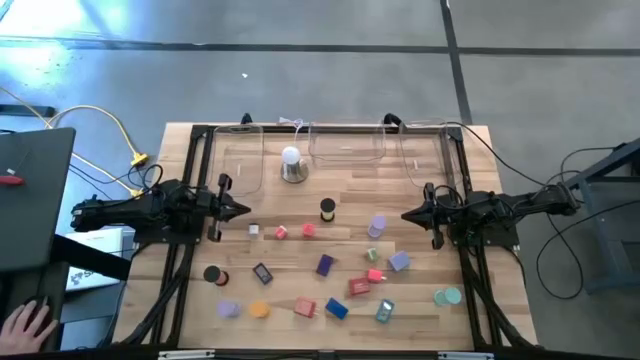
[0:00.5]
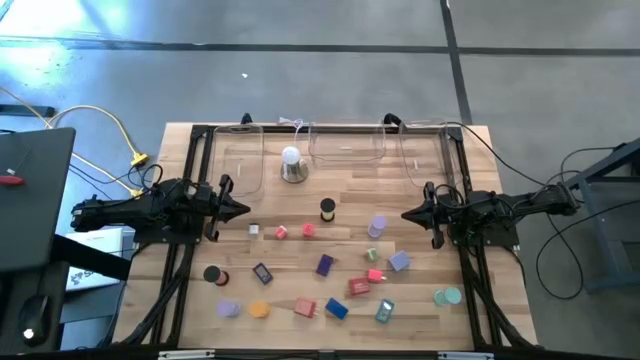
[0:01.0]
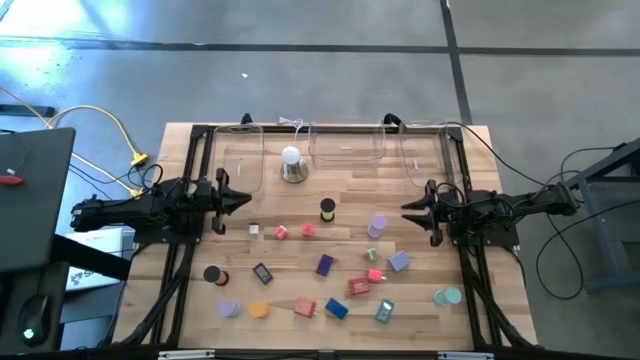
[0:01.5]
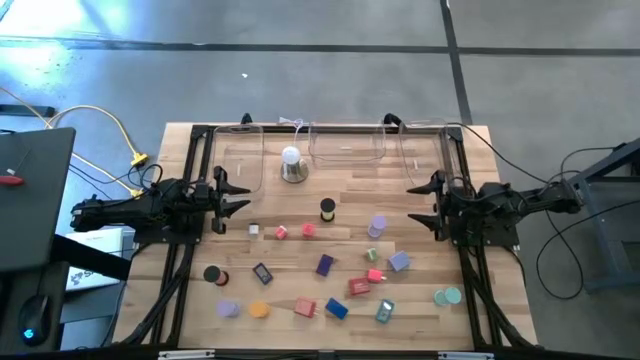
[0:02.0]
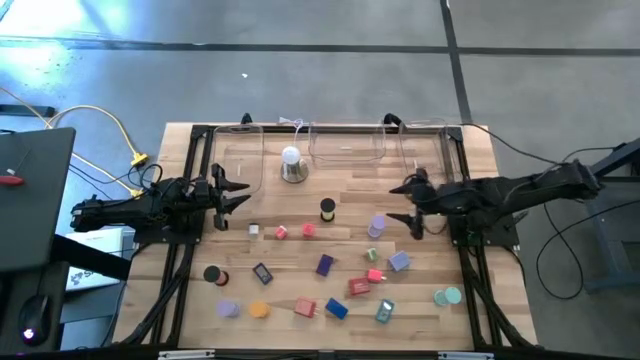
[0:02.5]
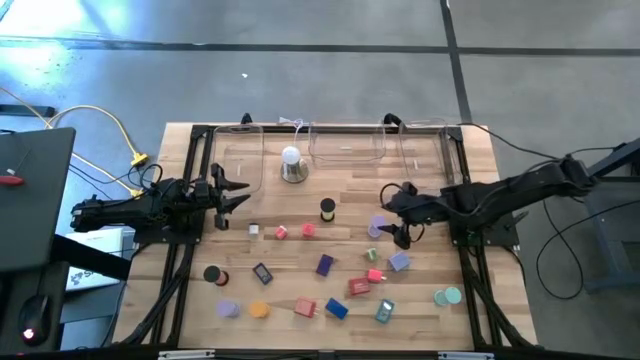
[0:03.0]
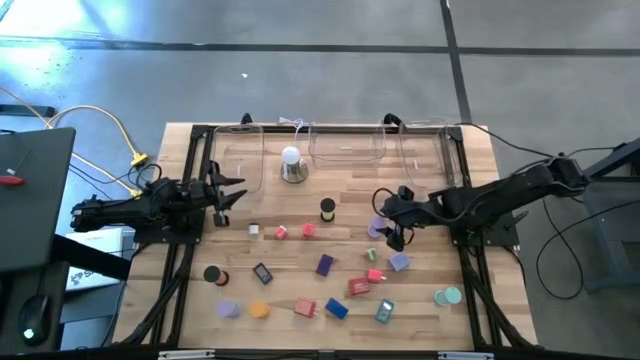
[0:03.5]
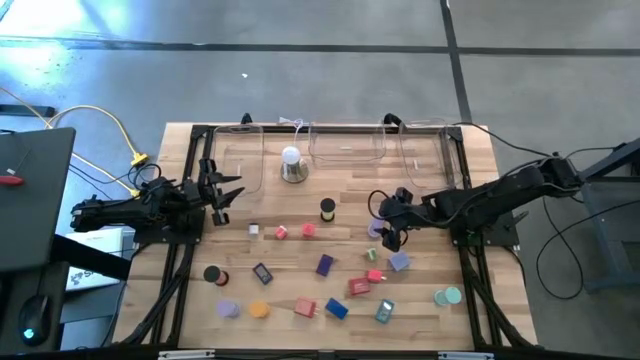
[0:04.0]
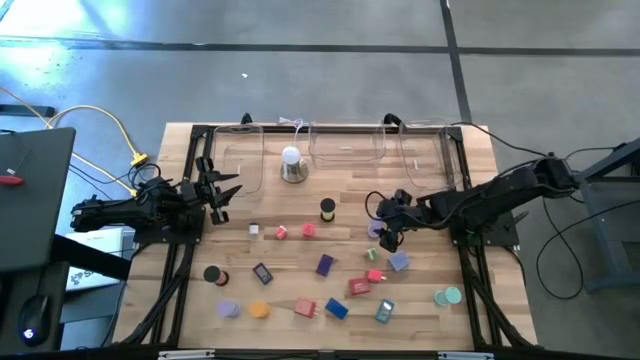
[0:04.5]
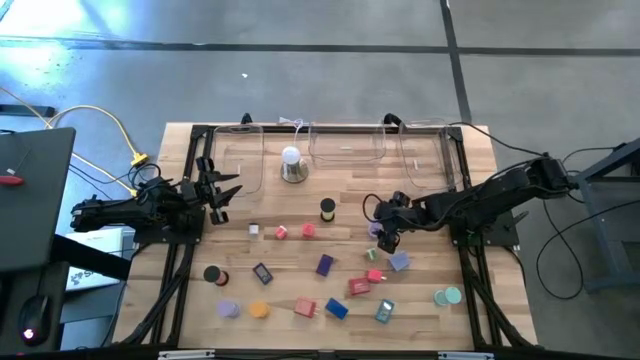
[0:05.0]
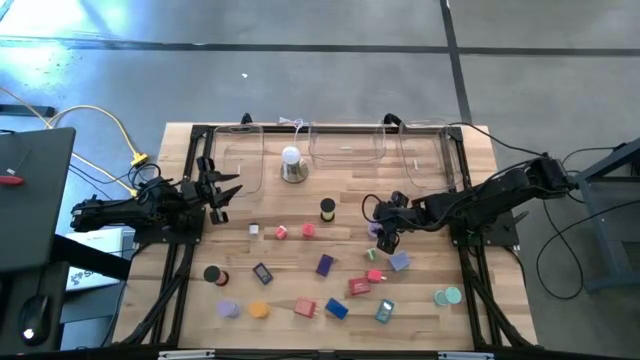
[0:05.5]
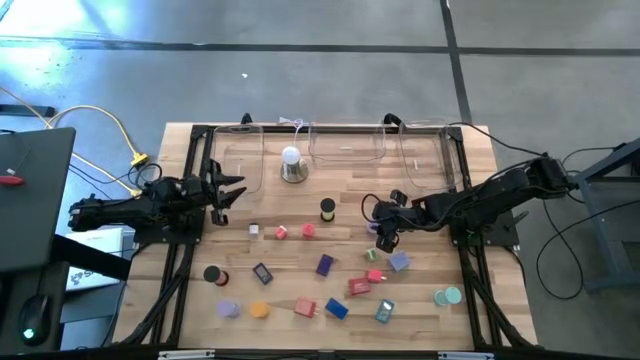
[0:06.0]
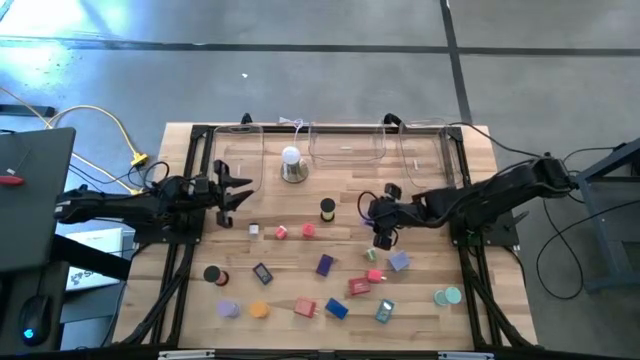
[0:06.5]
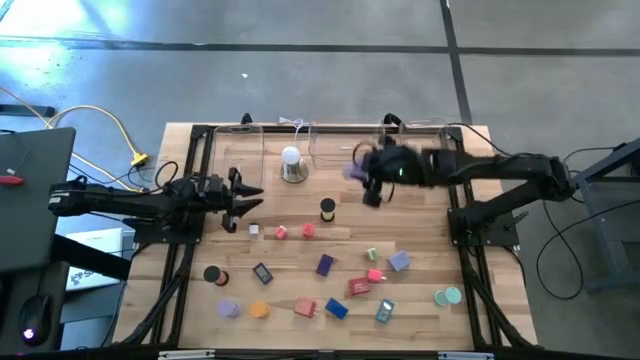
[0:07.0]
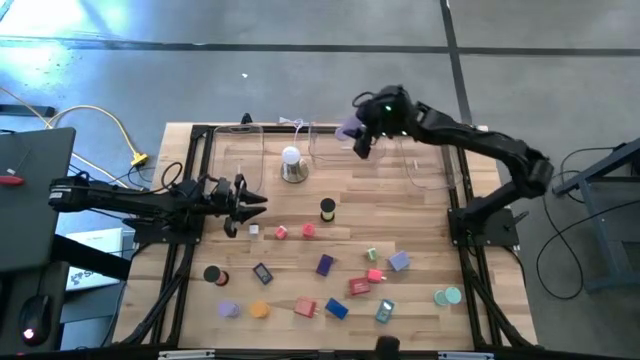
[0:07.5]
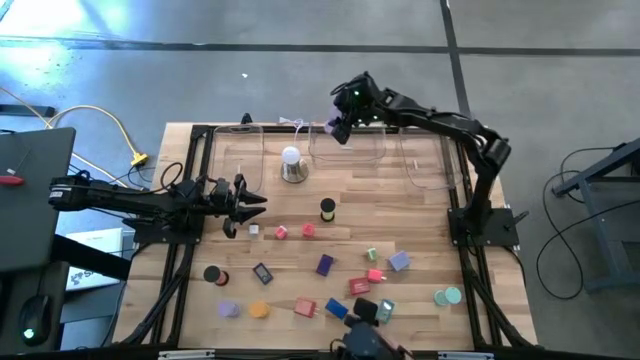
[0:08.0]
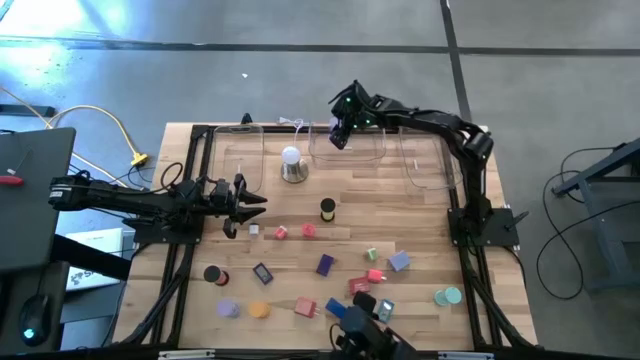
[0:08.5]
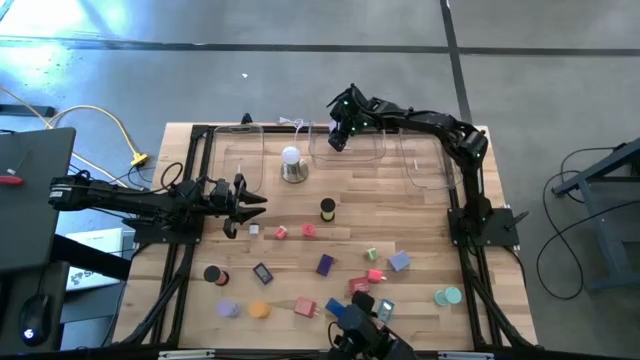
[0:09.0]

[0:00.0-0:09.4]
Task: Pick & Place Office items
Put the right purple hourglass into the center transparent bin

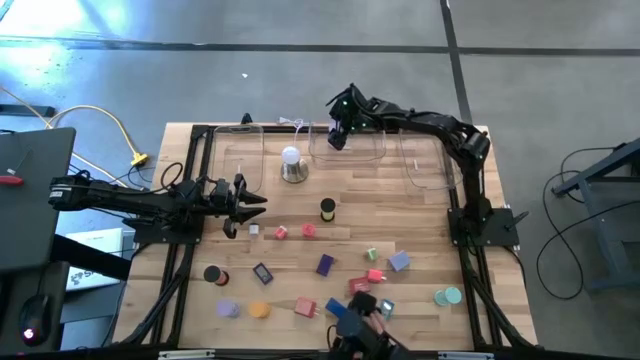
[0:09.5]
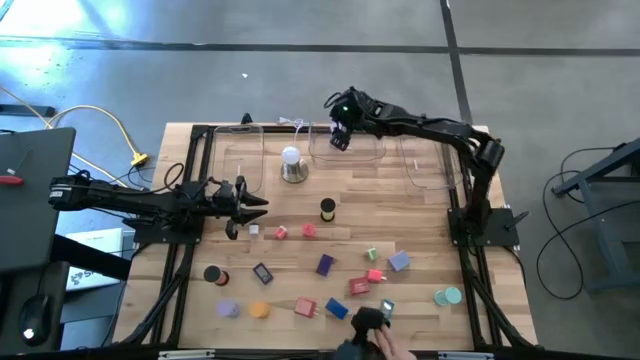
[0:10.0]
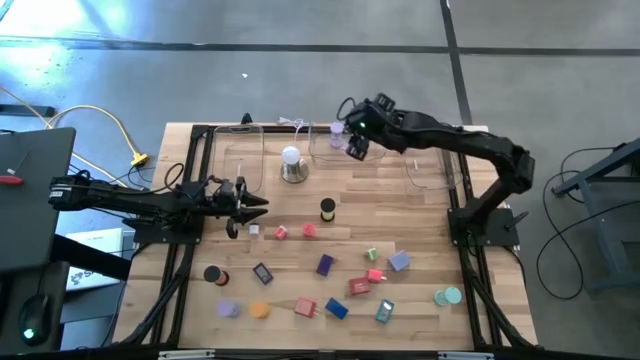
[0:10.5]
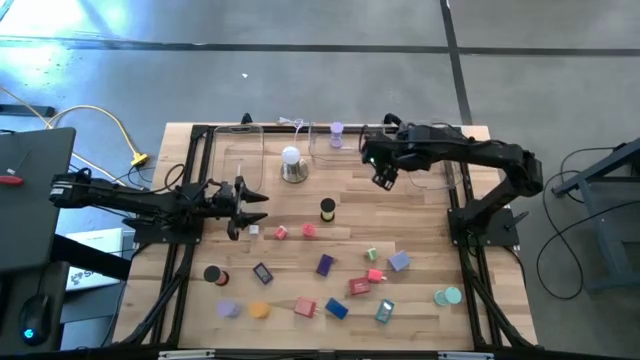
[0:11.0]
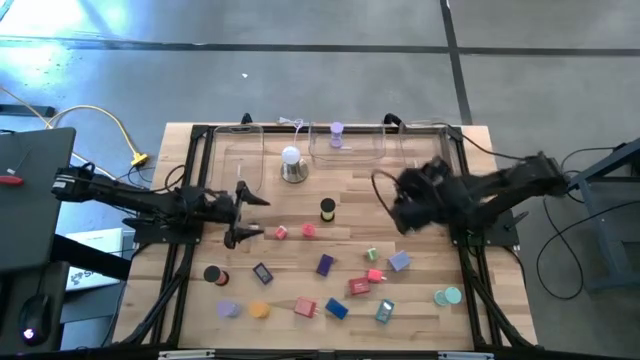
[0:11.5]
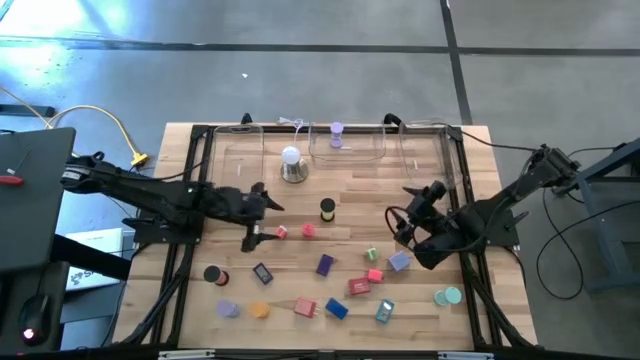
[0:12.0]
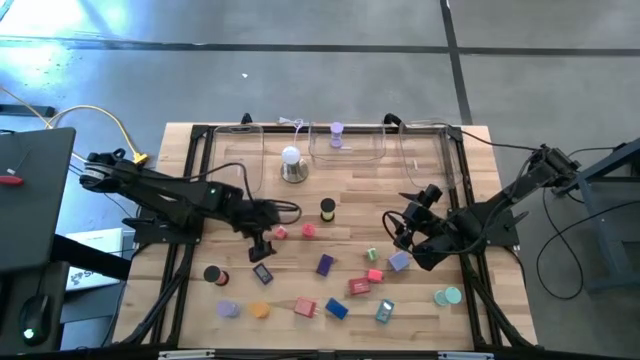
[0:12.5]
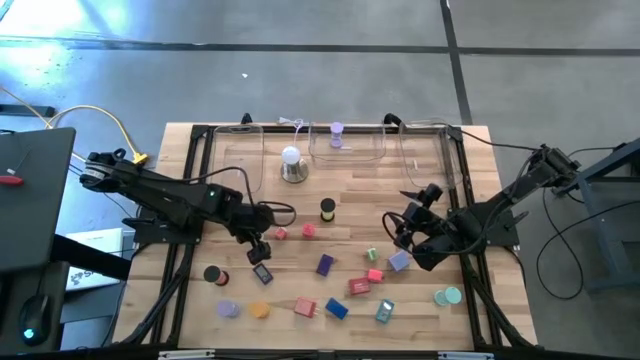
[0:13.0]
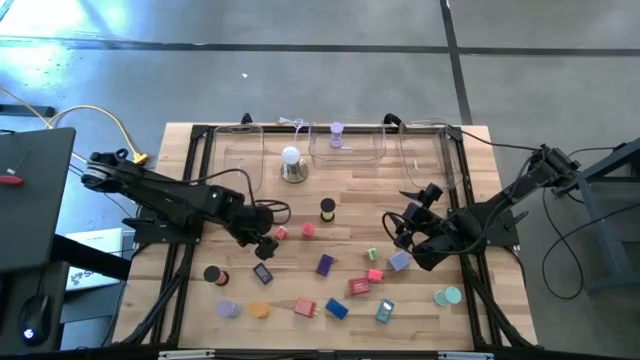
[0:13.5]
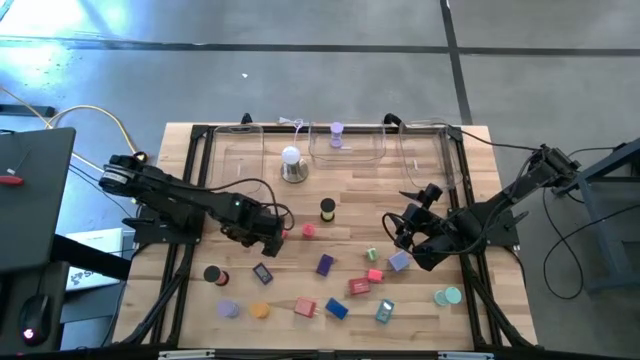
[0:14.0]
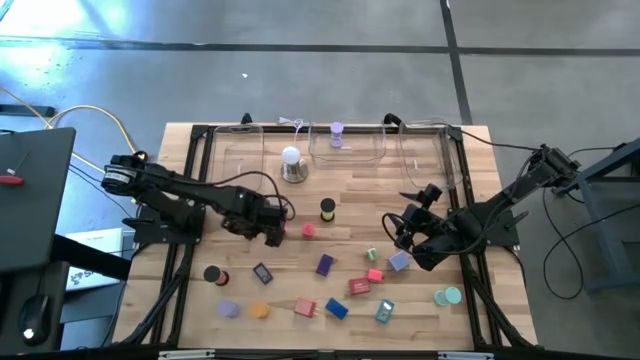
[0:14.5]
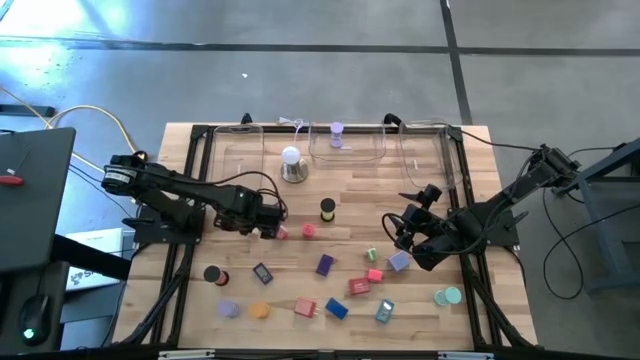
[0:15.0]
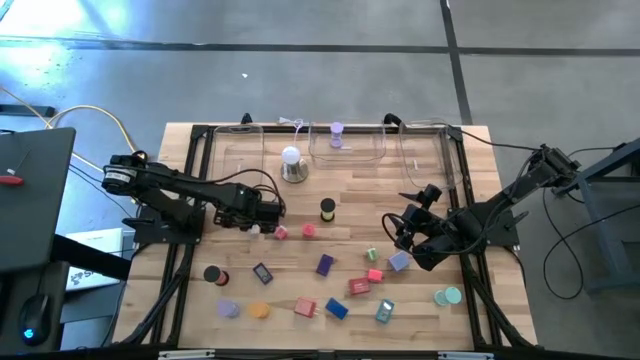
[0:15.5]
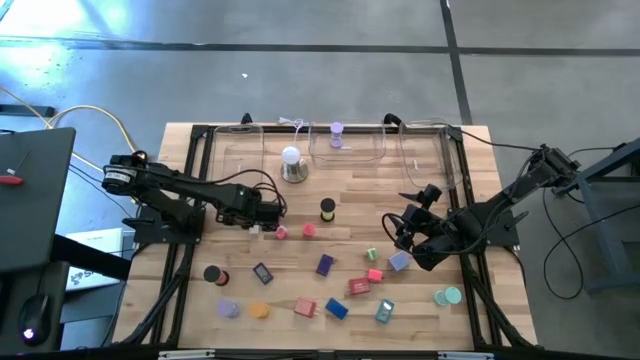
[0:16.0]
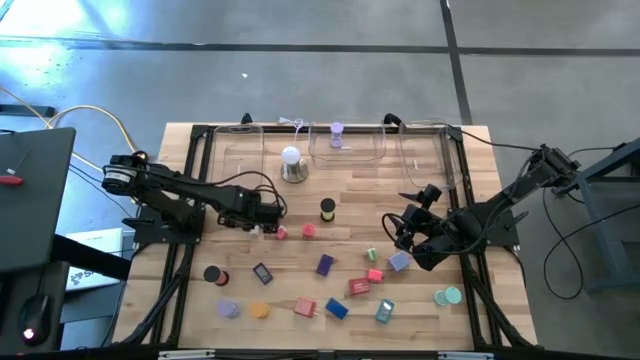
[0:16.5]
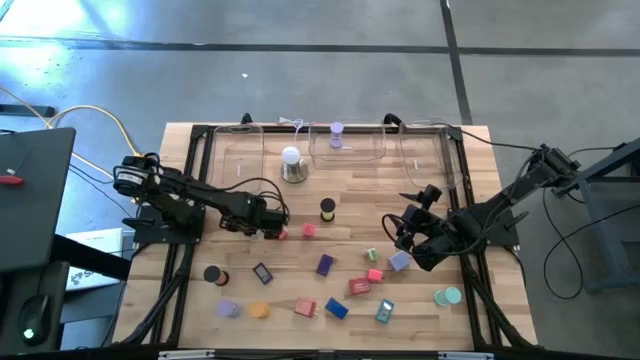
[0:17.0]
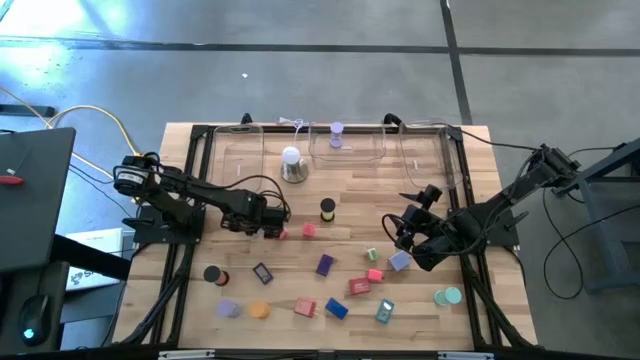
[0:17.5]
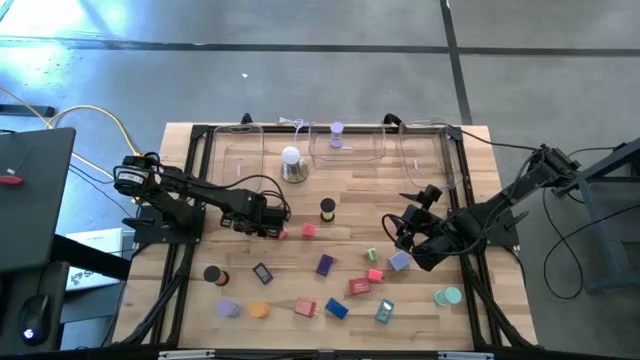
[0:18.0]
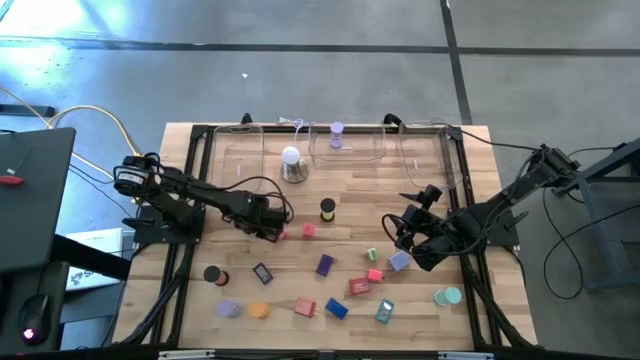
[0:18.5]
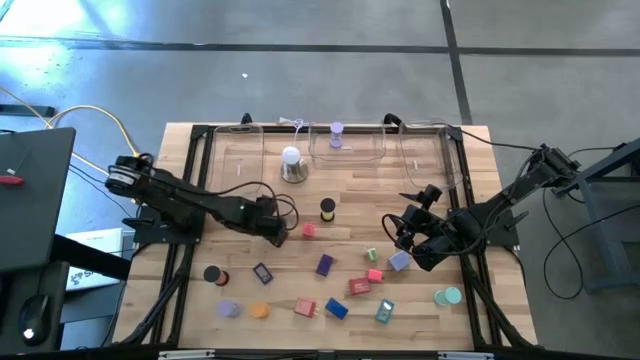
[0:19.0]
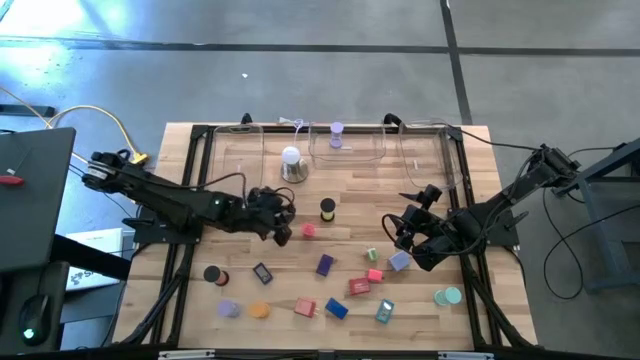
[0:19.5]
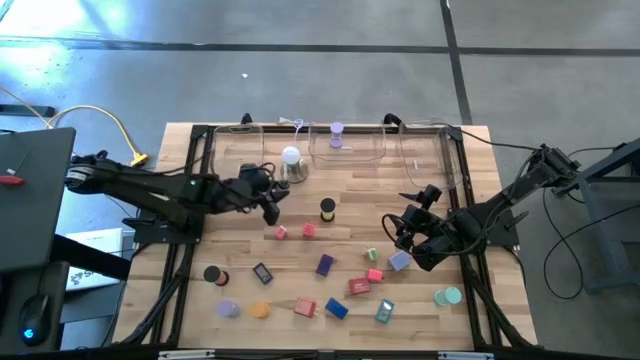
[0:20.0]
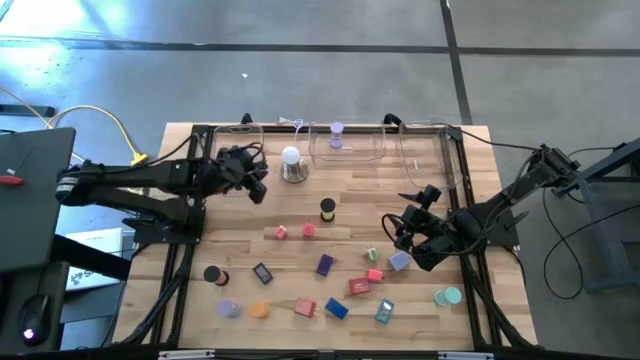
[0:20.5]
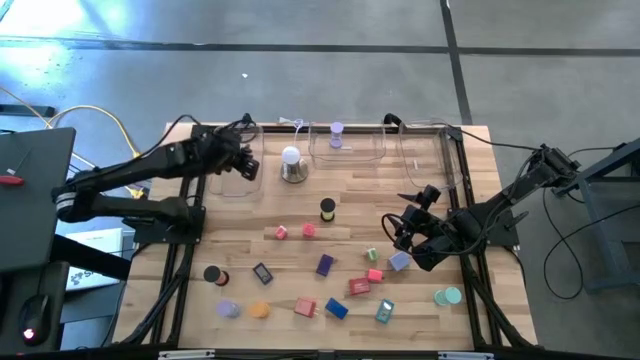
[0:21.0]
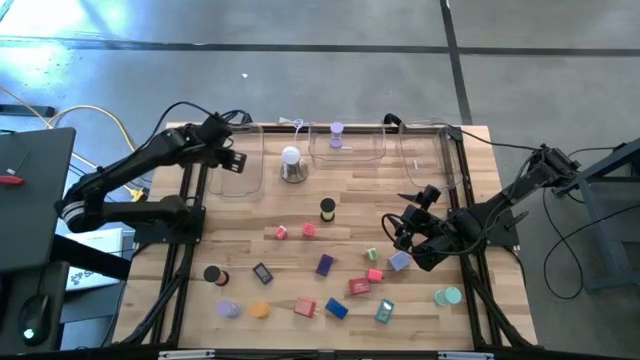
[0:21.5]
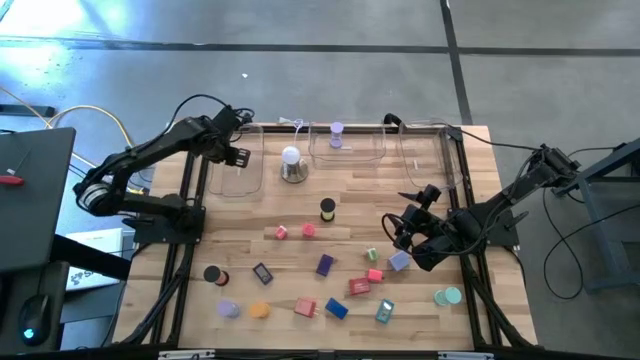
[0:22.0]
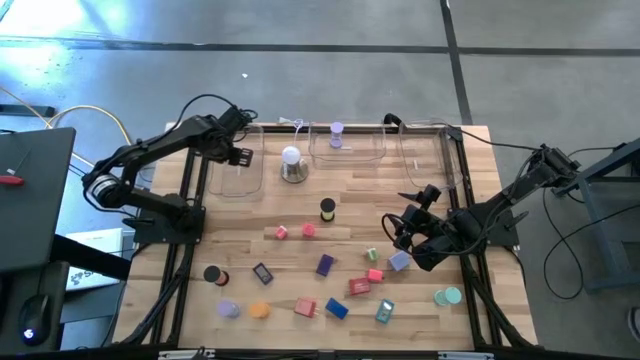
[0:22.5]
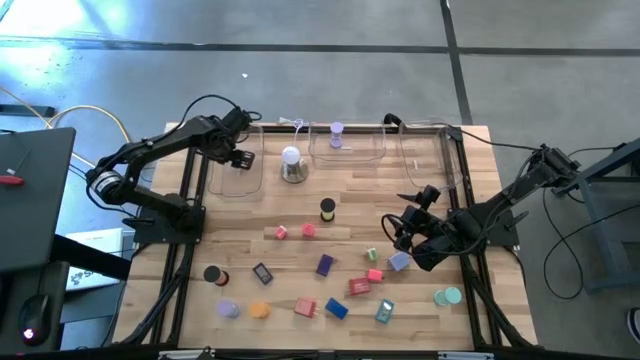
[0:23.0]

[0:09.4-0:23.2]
Put the white charger adapter into the left transparent bin
